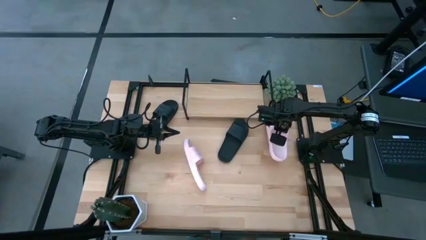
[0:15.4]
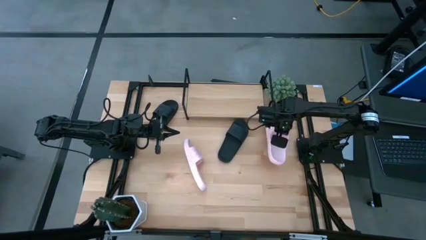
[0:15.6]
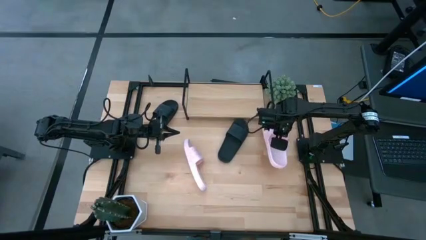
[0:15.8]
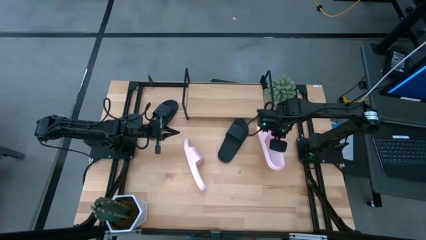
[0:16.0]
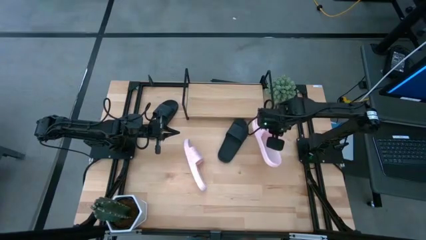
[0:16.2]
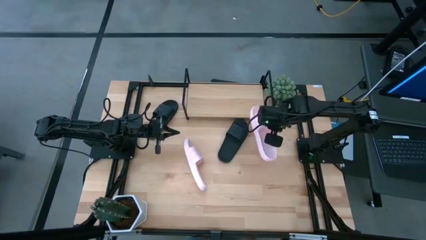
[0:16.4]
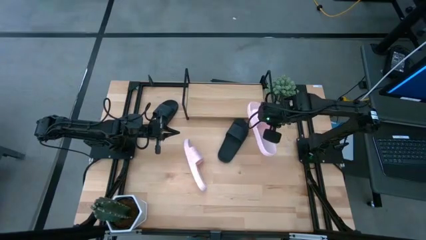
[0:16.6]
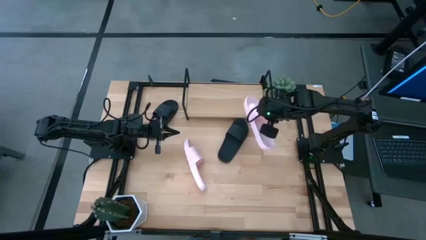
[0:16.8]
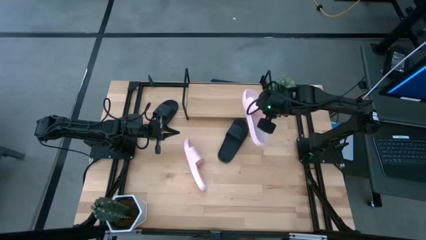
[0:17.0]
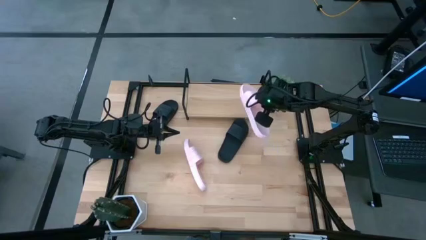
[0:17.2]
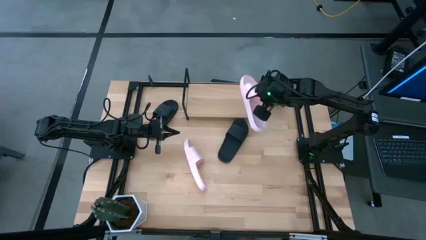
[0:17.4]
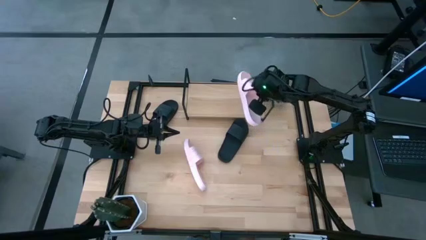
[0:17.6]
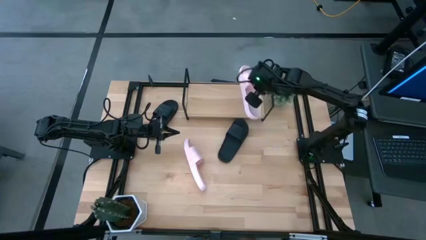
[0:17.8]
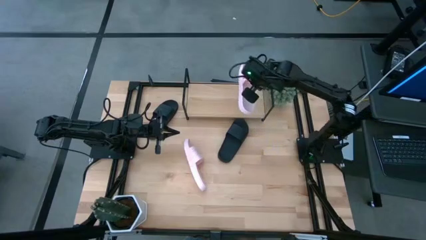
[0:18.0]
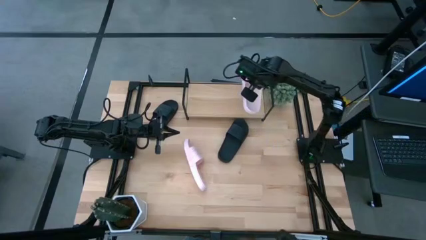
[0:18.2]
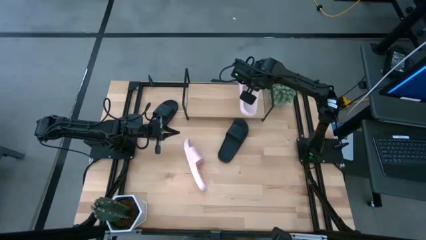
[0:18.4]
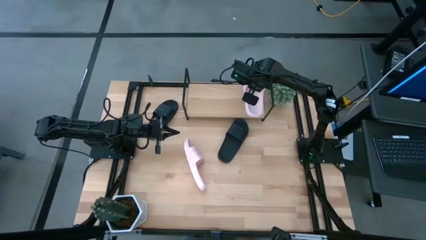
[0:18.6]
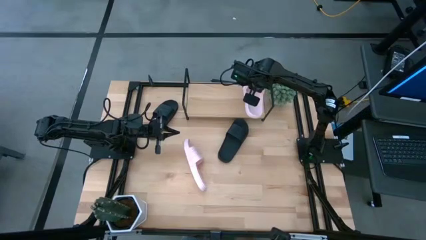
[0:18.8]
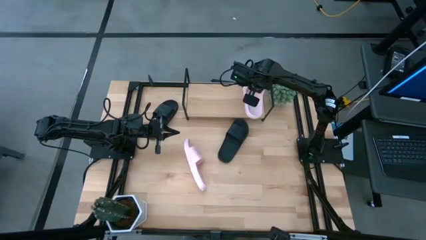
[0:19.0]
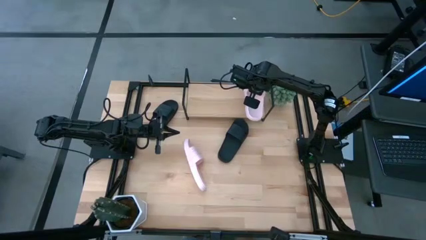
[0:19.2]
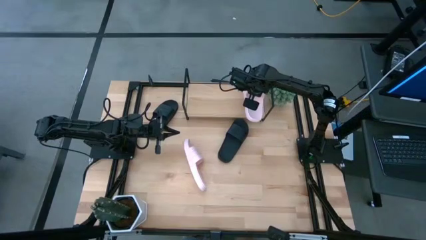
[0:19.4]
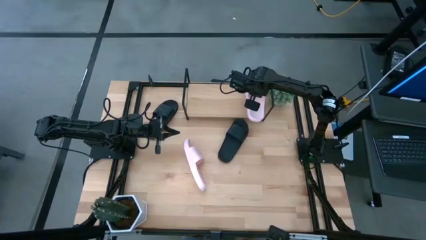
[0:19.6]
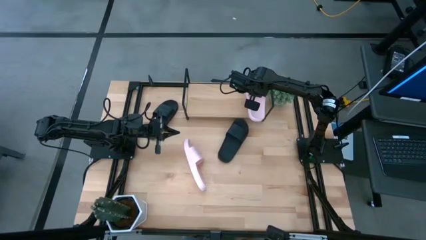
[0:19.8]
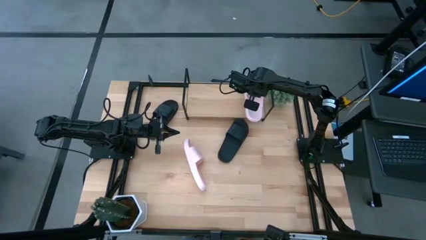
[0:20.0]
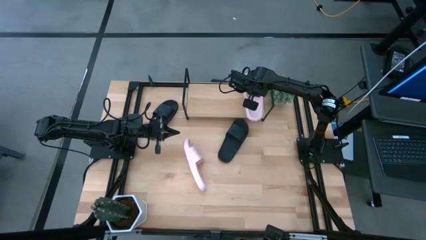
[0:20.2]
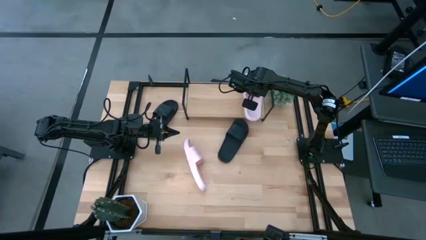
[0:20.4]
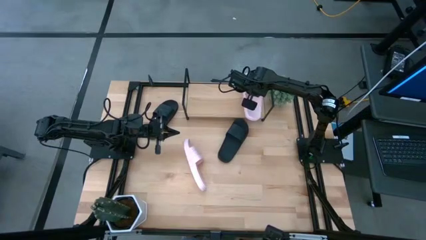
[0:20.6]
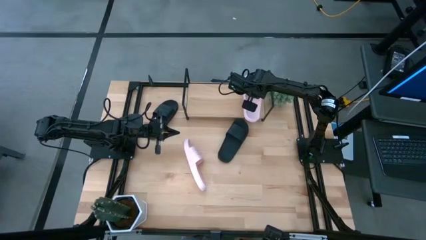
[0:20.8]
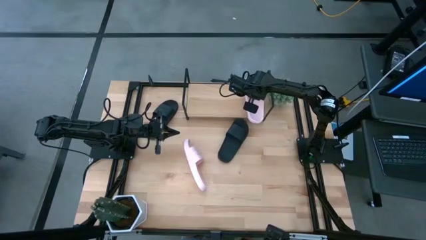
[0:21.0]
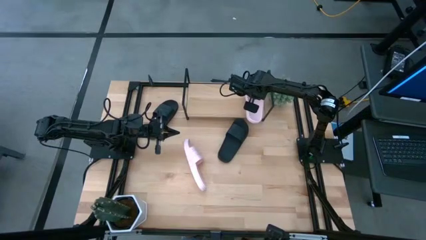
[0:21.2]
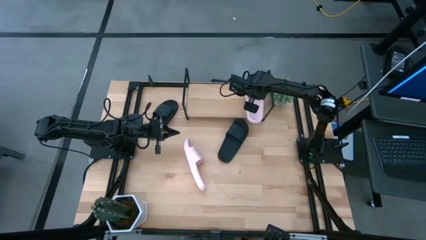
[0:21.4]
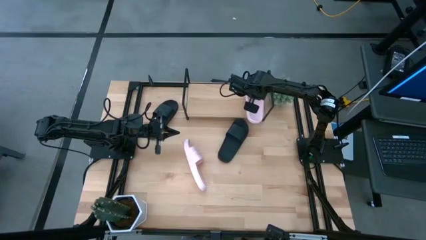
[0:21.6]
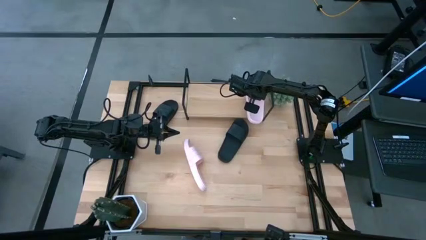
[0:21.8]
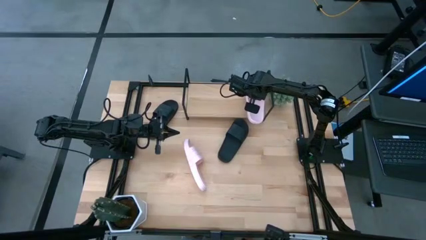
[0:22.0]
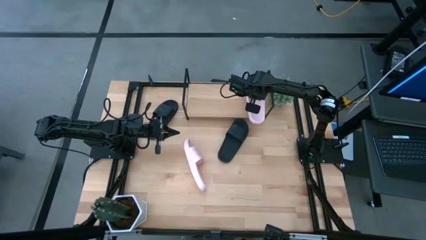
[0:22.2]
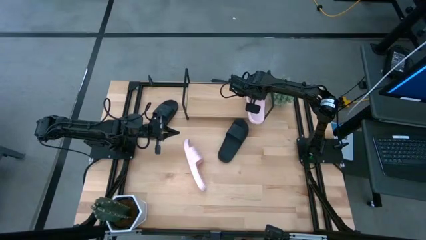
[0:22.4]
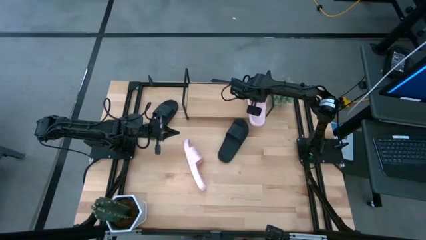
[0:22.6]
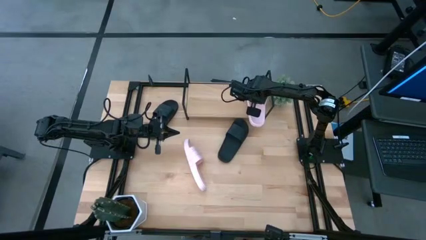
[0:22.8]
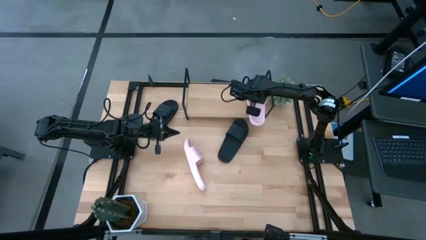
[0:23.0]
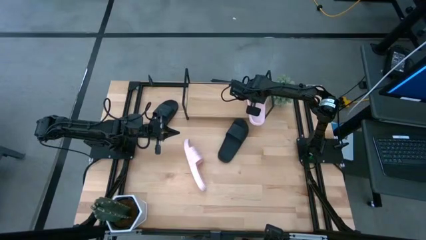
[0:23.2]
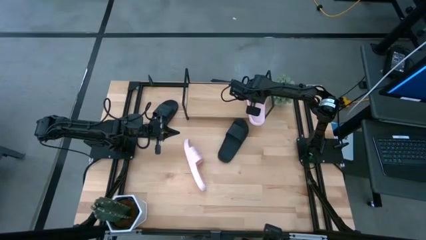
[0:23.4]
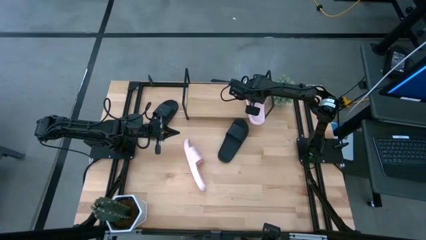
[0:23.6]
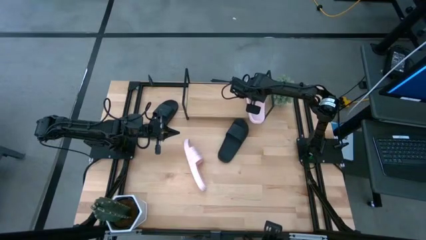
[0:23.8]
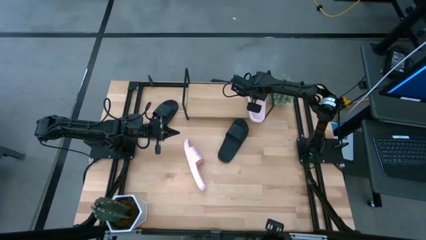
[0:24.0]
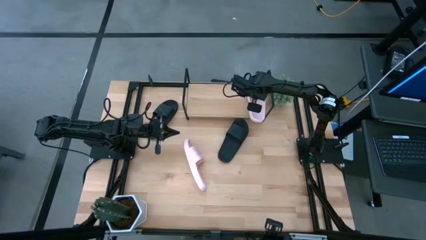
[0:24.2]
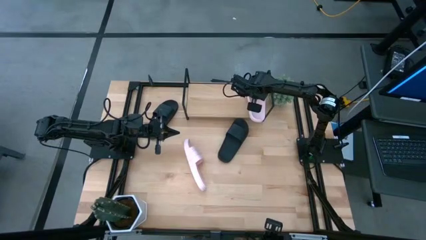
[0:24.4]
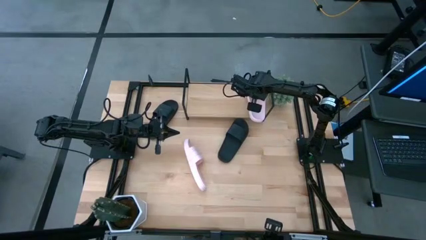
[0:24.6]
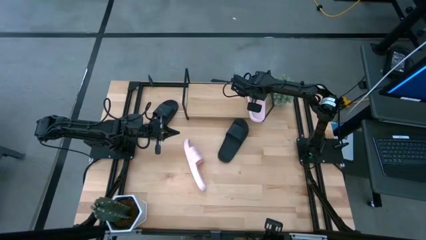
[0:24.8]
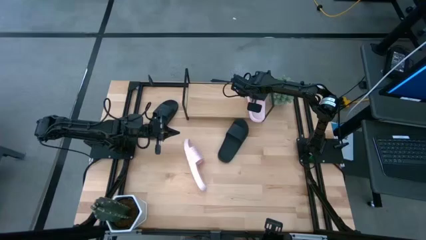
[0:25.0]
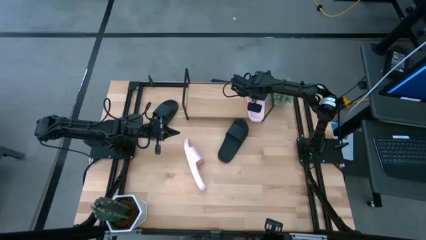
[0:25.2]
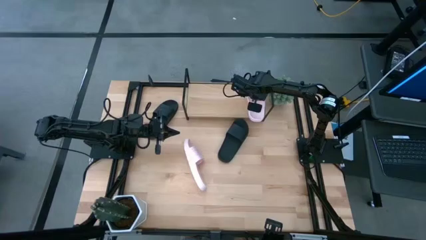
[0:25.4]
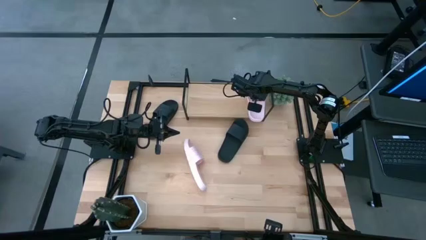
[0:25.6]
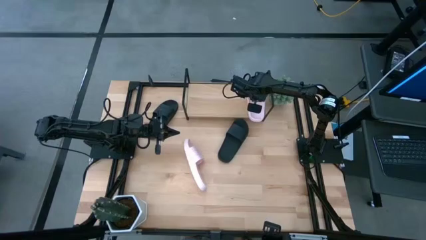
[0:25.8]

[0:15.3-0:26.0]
Task: Pick and place slides into the shelf
Put the right pink slipper on the shelf

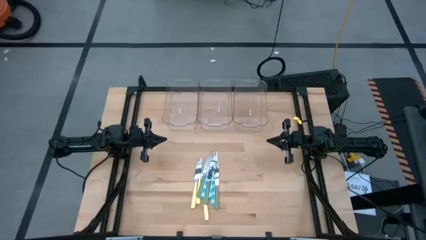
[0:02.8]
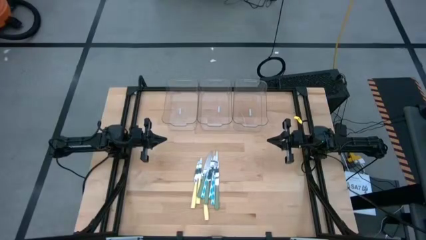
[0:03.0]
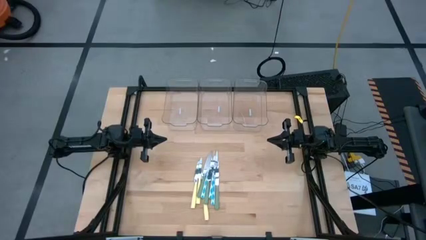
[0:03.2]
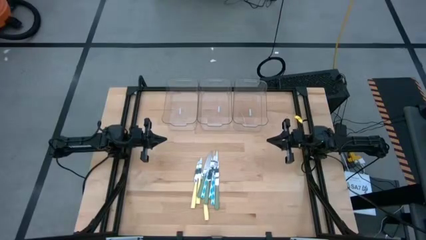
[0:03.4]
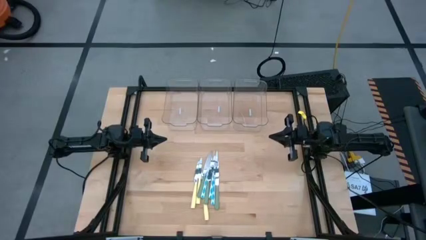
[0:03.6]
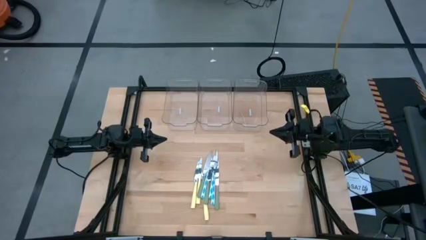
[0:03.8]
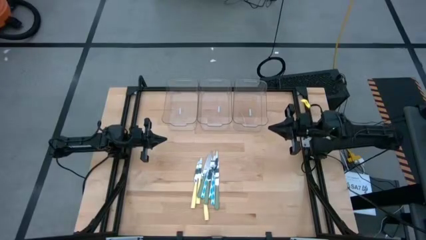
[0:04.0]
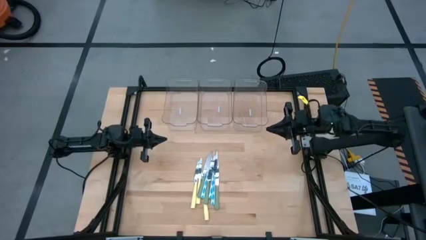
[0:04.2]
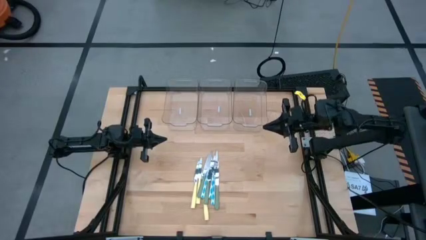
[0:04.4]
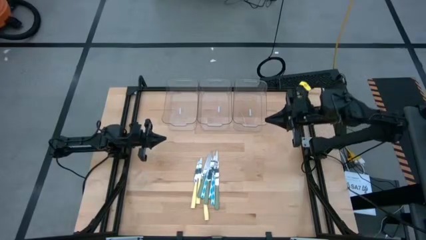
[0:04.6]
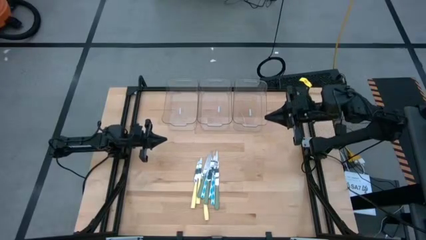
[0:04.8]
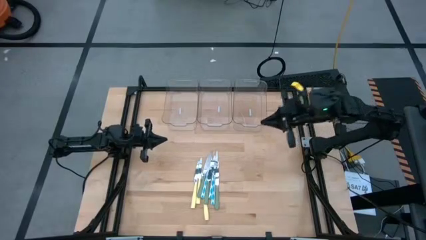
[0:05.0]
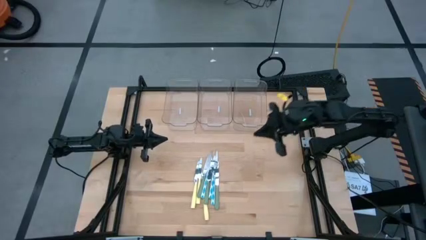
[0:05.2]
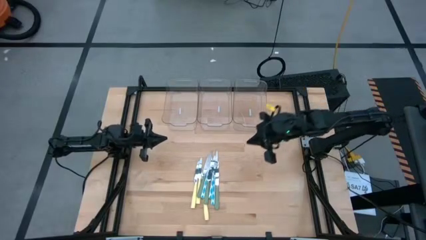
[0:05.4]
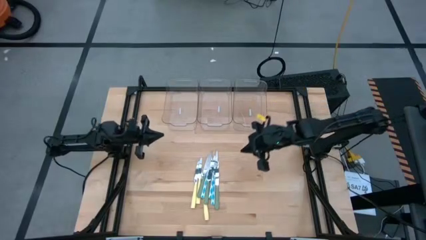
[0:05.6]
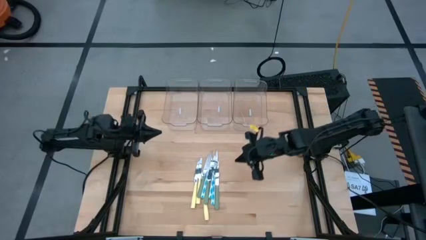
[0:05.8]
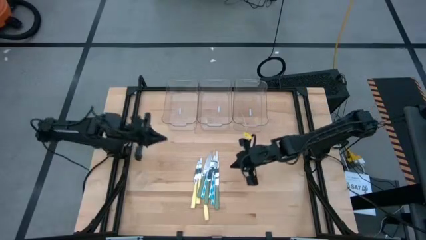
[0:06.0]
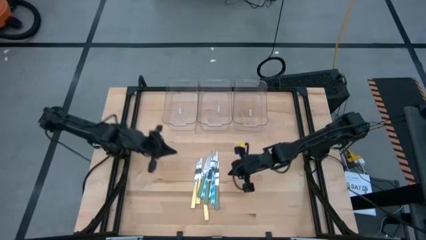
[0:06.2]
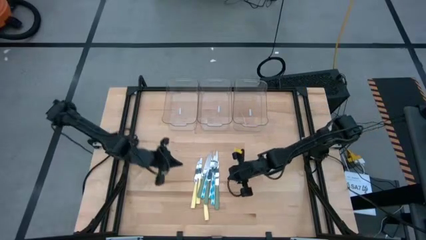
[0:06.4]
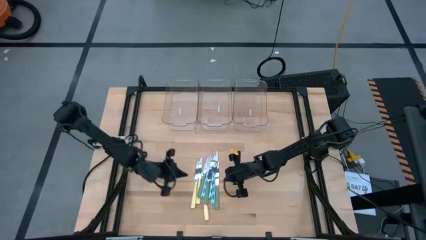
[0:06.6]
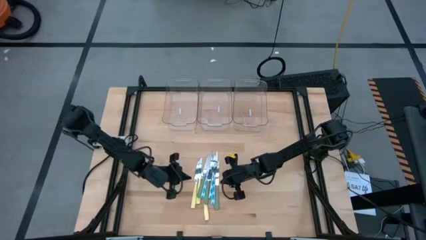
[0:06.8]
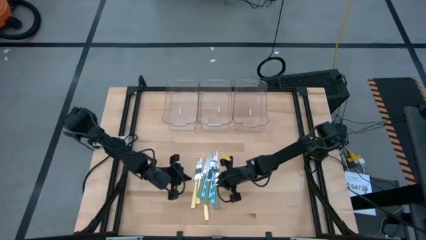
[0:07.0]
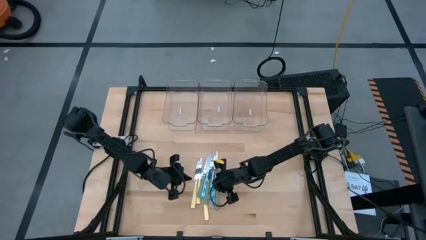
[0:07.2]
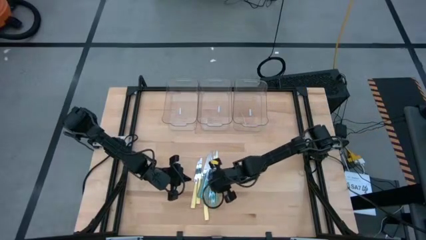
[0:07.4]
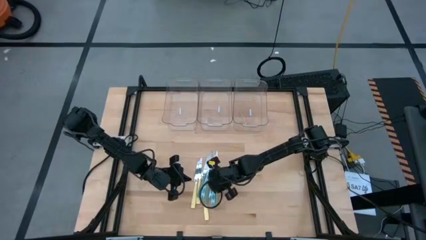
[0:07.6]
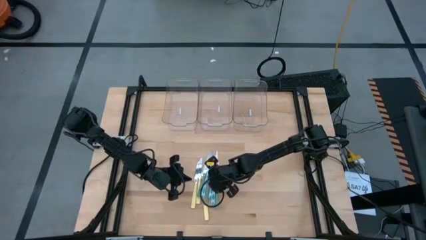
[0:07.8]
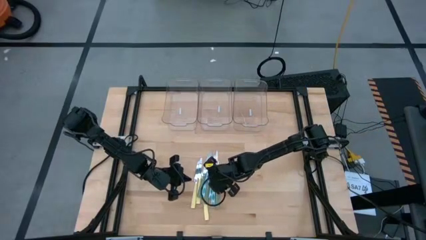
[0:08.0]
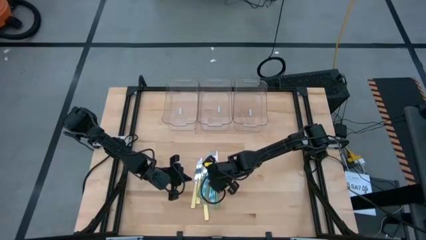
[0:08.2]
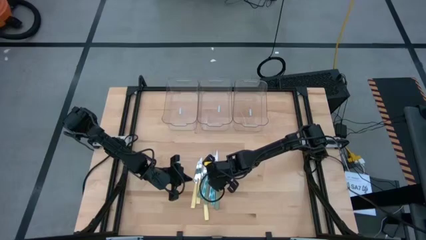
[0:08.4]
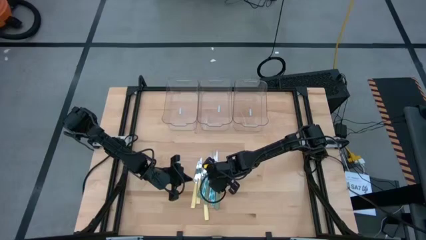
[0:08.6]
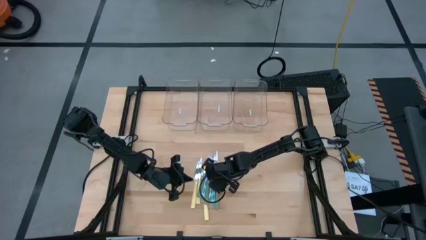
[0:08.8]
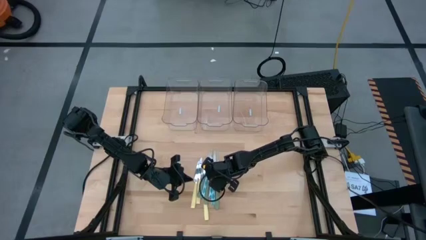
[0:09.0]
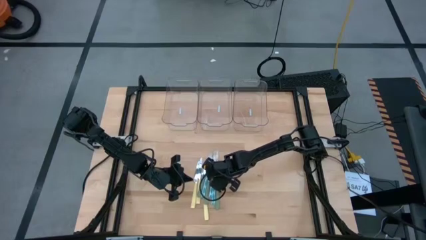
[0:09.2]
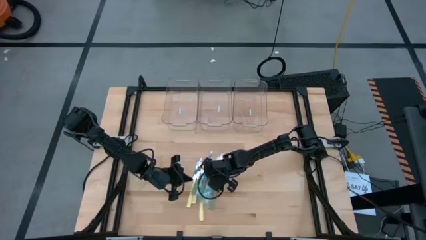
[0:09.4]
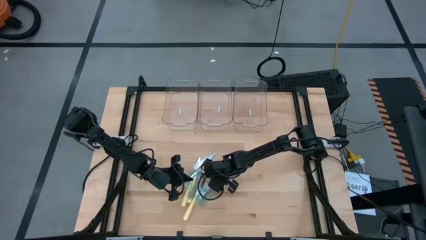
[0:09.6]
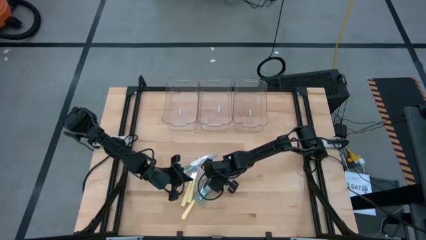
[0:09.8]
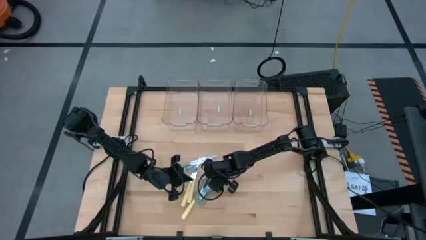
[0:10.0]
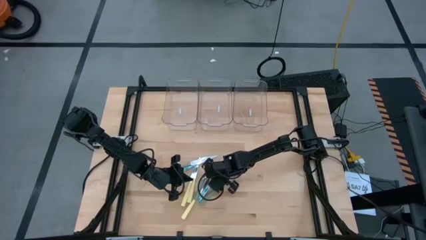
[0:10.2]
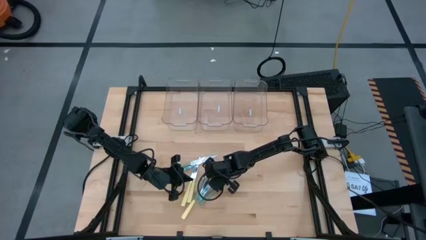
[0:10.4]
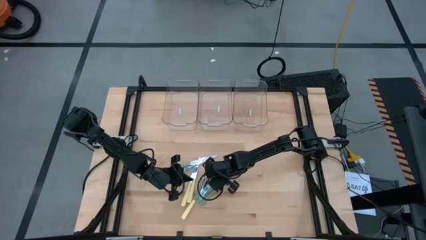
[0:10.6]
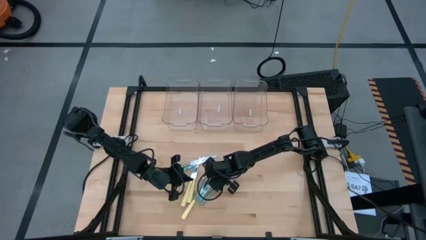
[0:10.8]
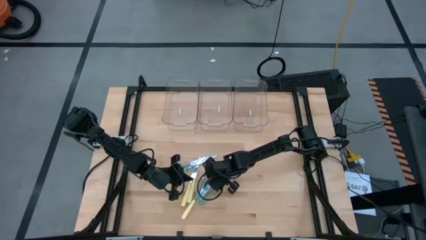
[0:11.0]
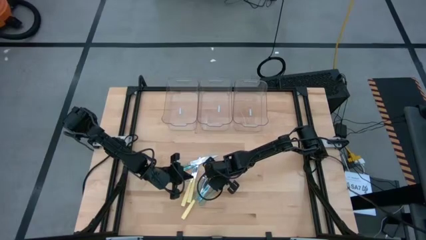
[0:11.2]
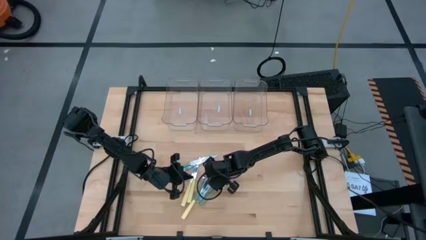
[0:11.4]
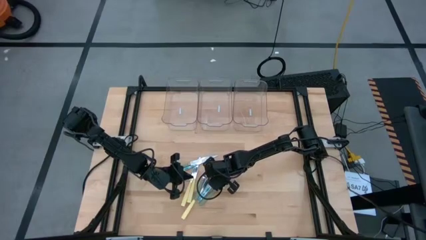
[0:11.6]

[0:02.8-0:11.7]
Task: Sort silverware by color (type)
Put the blue patterned knife into the left transparent bin
